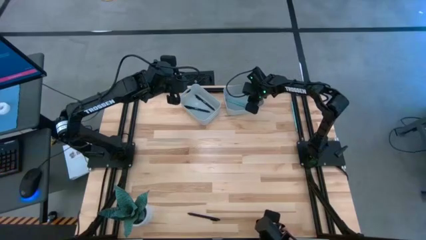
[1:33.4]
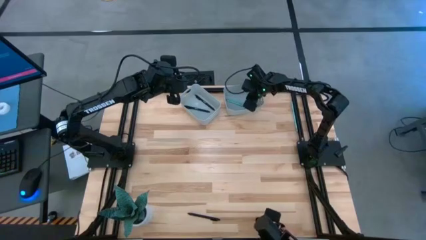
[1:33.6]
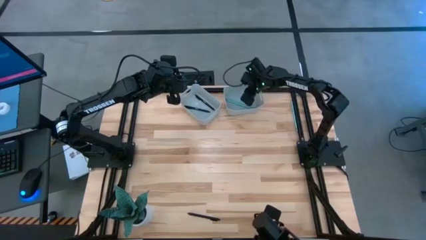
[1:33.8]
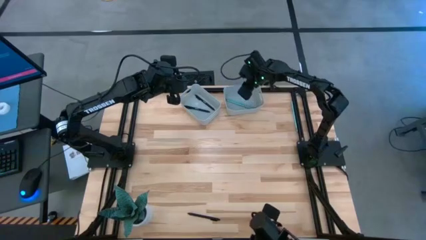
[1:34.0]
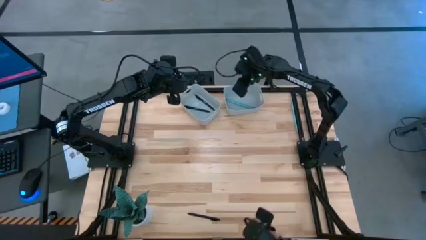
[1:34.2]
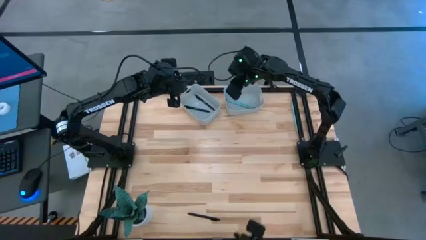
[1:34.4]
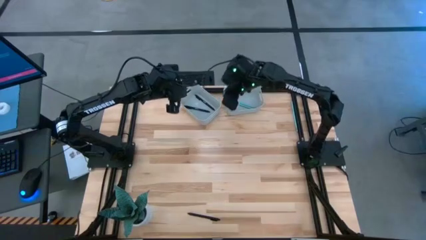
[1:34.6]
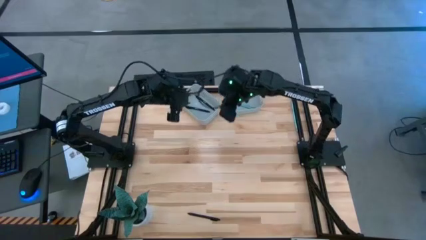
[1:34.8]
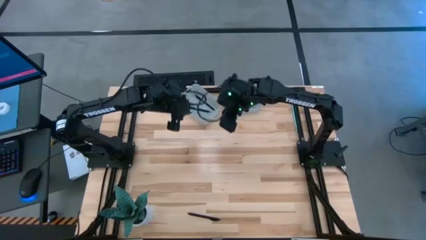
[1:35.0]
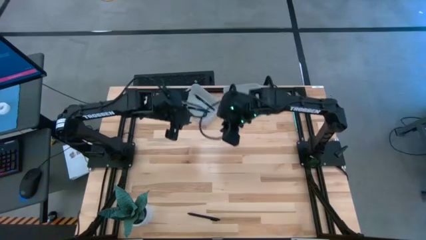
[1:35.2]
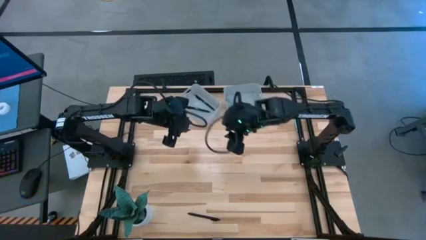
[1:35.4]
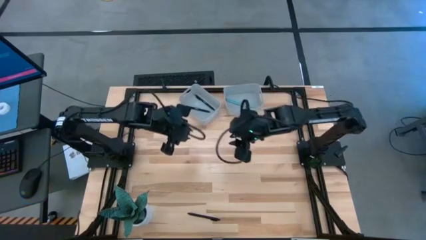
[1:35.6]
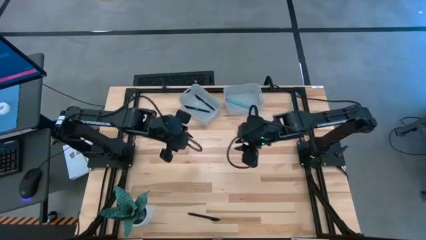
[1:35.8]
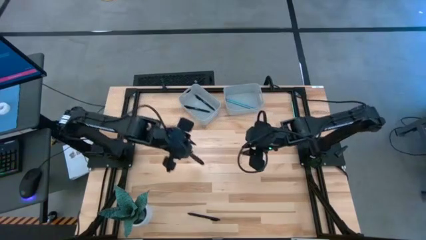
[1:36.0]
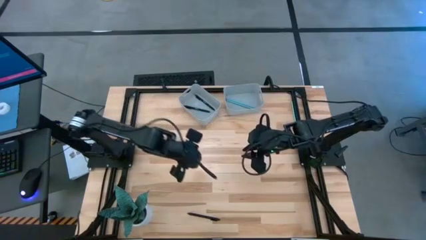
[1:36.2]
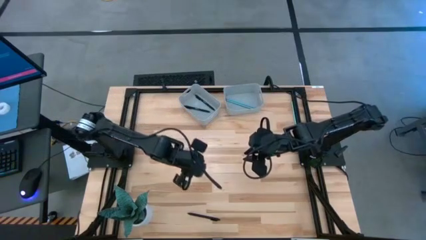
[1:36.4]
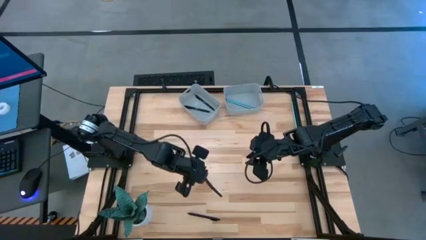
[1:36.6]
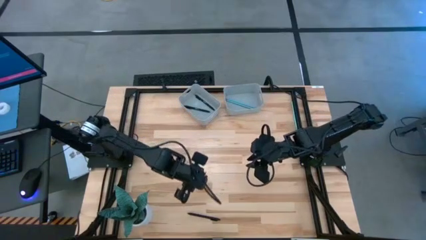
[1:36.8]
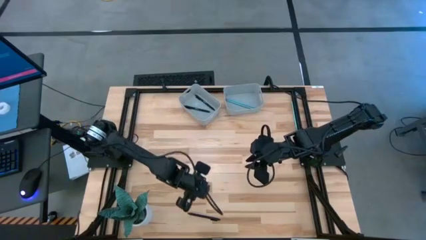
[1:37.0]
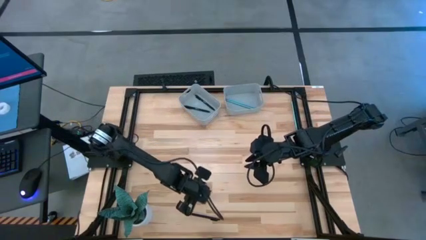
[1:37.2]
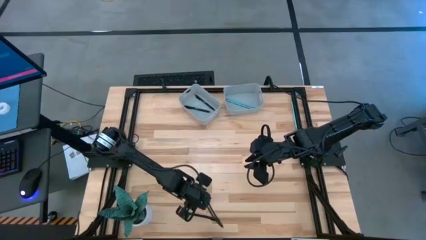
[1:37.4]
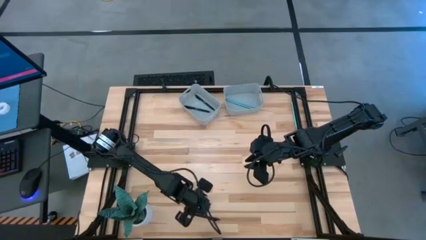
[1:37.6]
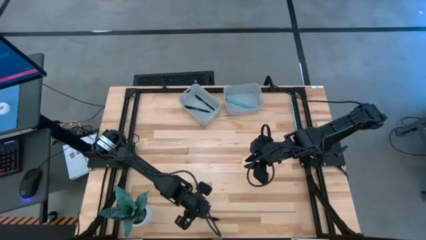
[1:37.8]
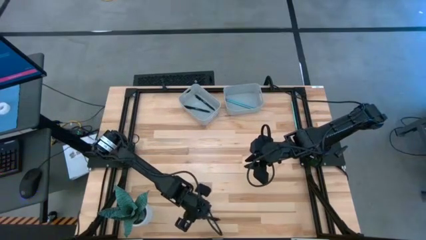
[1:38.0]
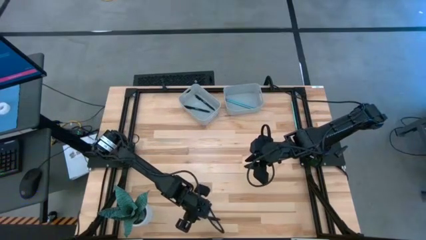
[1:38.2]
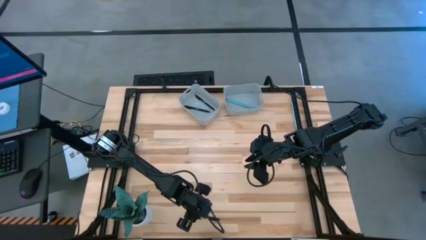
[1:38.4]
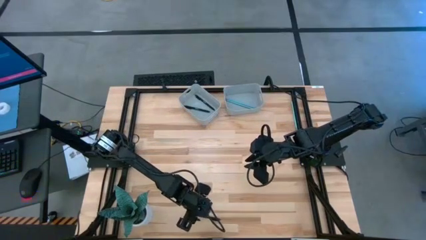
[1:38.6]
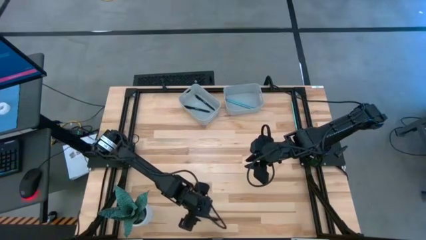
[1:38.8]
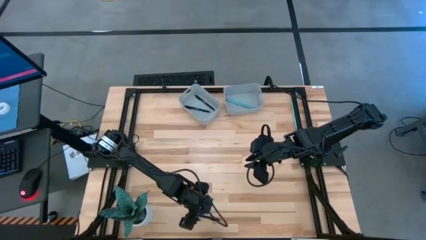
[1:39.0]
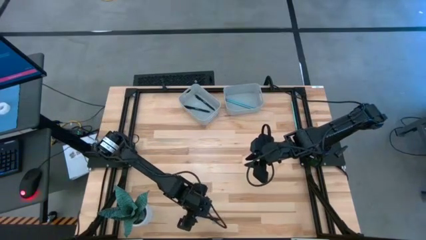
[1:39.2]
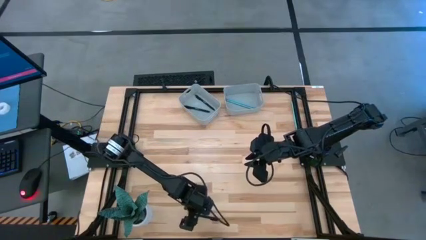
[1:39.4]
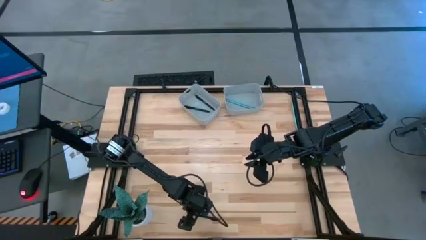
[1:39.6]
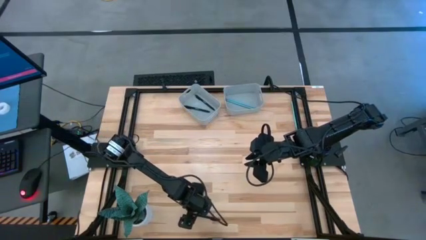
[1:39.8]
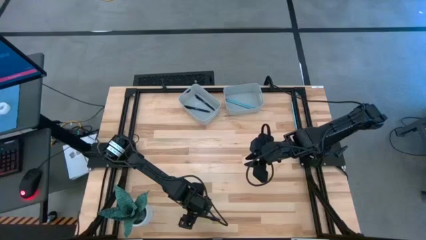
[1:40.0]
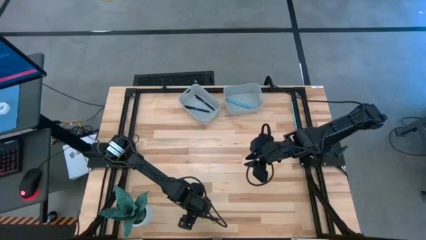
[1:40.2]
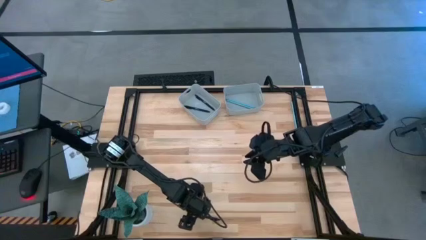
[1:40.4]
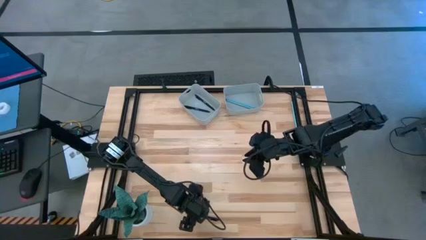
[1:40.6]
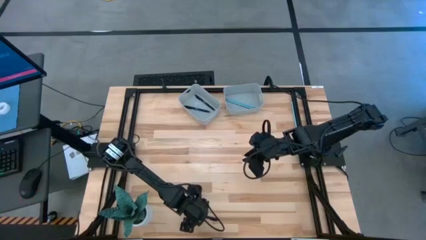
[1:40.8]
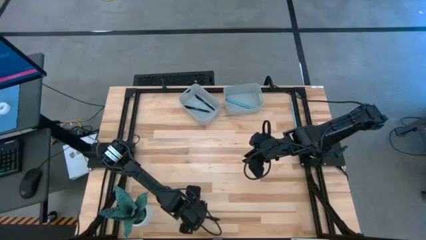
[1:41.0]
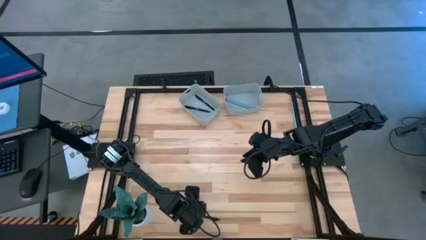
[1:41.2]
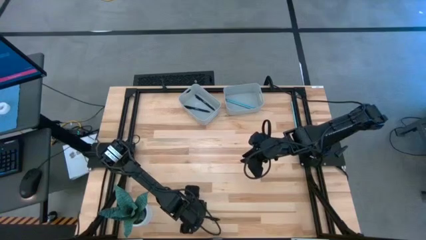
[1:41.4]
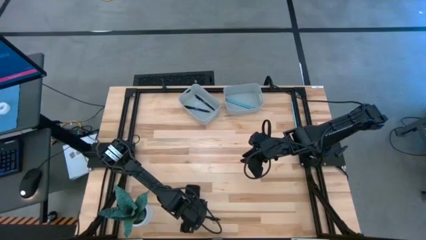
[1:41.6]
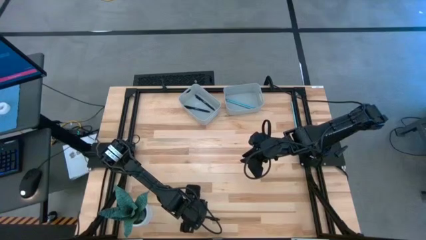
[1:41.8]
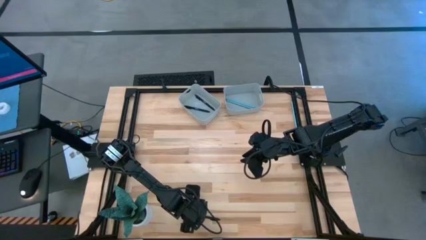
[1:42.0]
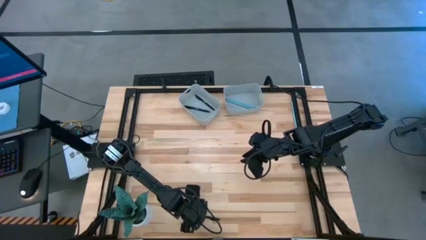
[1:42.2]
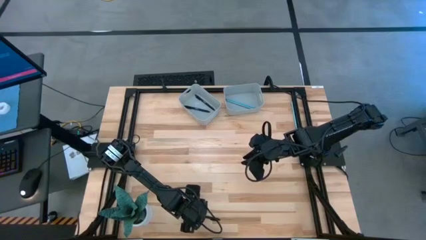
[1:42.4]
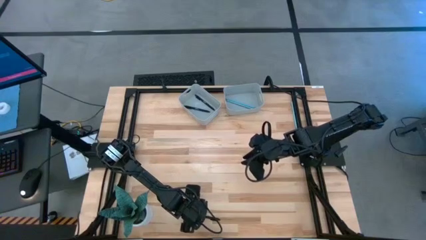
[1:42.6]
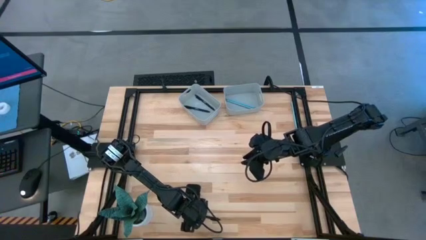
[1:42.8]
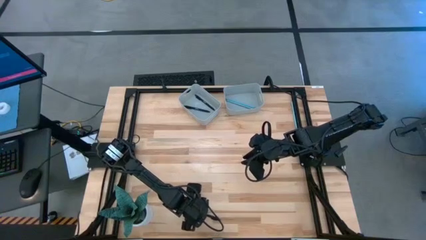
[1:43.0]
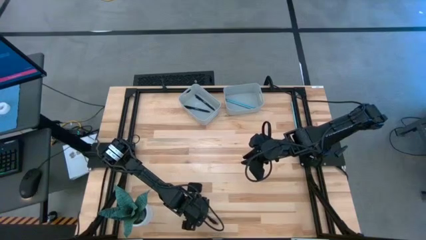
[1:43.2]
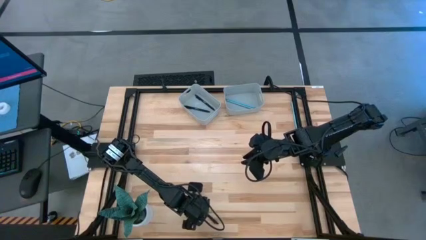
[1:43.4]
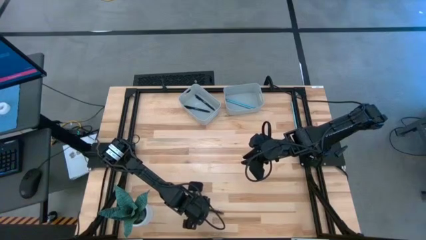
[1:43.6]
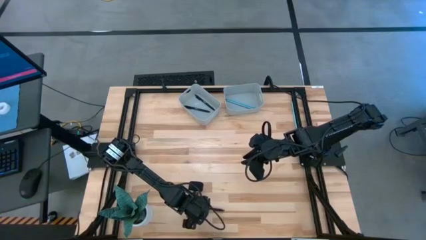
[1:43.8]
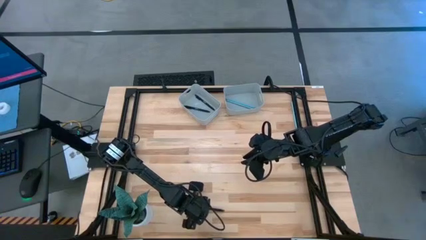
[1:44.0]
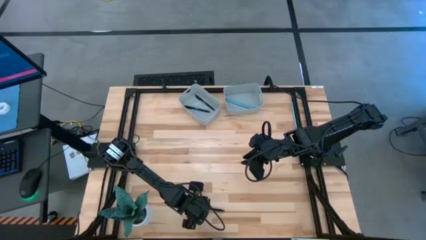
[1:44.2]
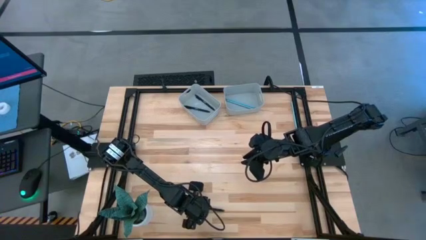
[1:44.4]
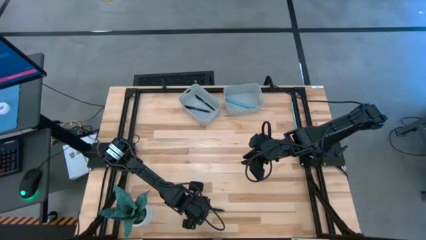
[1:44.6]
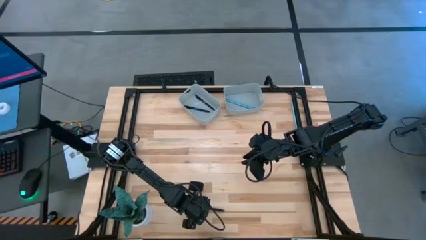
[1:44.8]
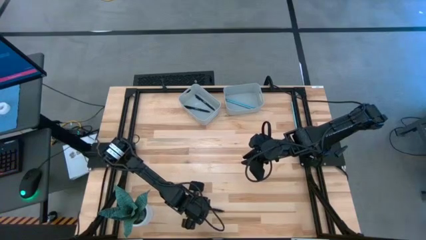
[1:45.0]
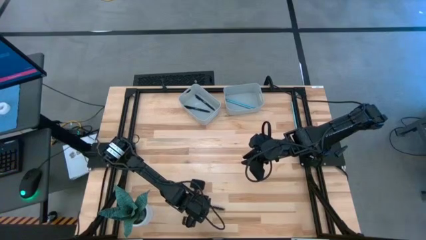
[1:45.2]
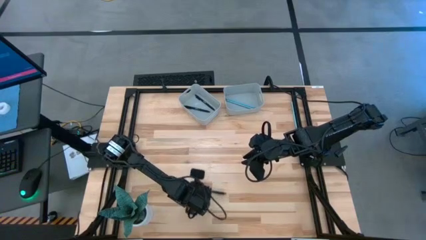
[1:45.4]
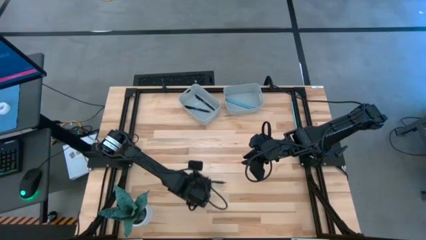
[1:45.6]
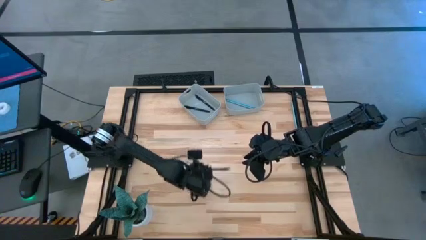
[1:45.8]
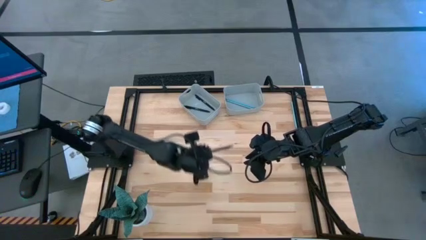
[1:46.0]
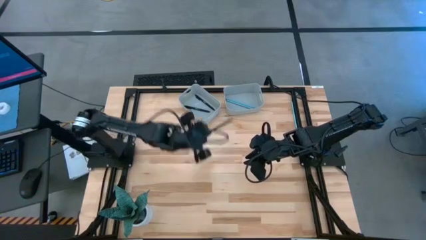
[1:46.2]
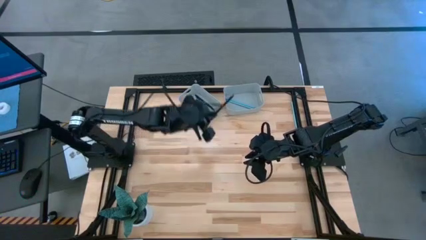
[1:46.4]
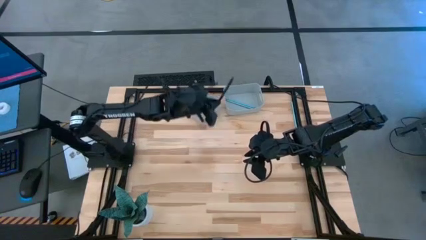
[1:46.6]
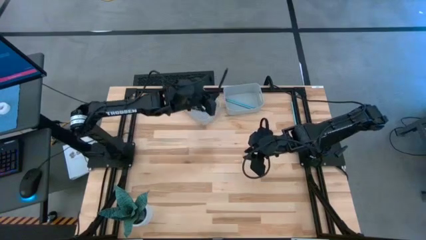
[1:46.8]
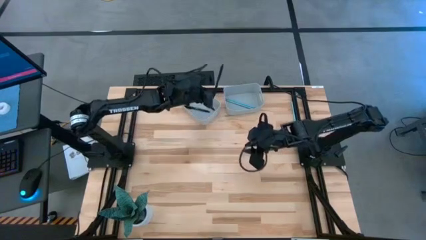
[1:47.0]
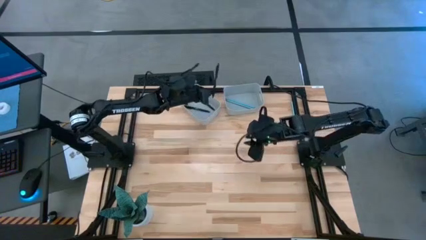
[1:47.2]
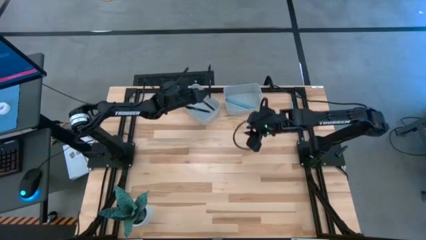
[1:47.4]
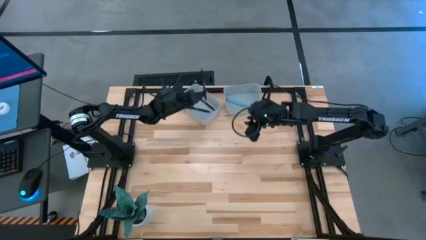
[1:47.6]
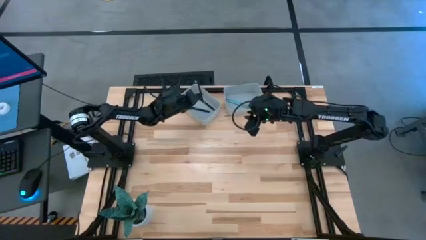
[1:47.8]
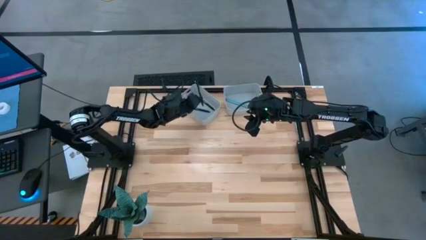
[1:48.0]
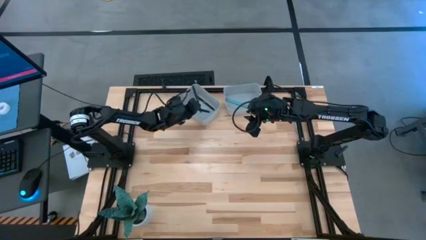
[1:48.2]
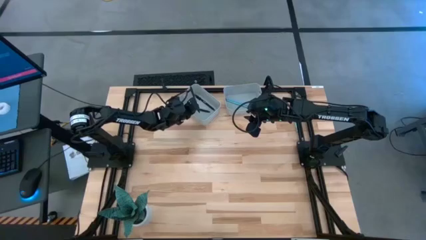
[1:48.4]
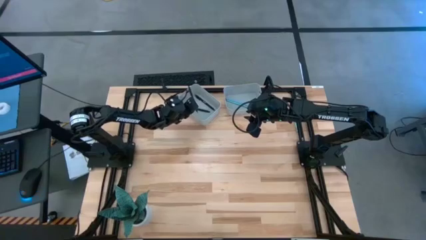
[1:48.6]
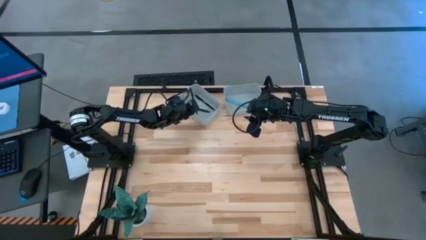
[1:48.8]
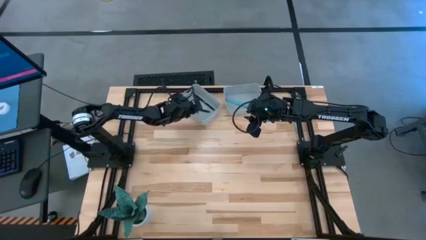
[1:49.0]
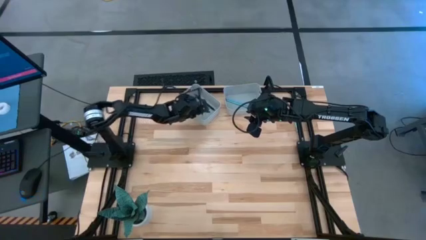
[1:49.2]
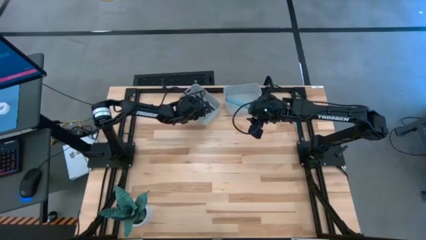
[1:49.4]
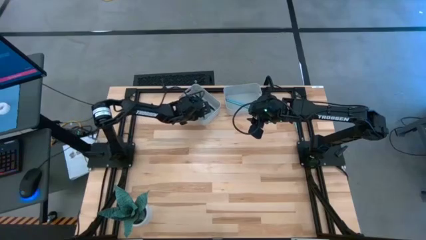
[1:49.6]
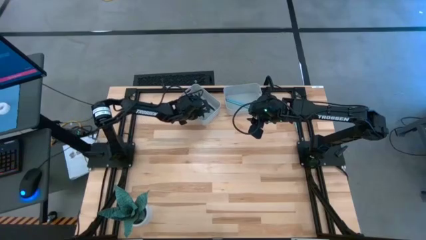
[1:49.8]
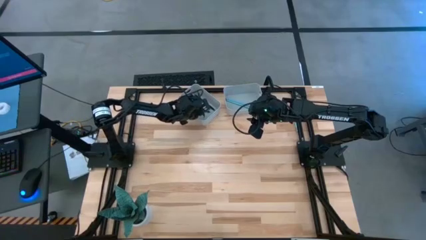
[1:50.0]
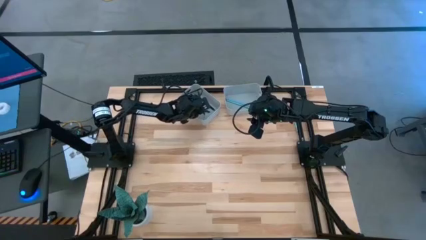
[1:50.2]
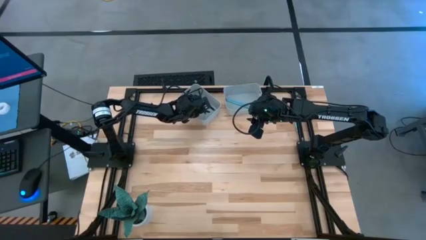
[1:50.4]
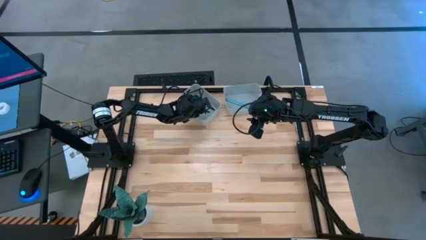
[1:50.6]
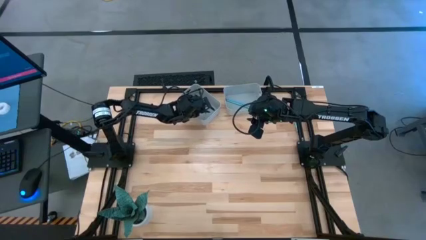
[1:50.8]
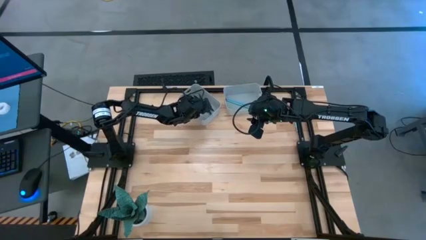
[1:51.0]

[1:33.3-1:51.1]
Task: Sort pens & pencils
Put the black pen into the left gray bin
